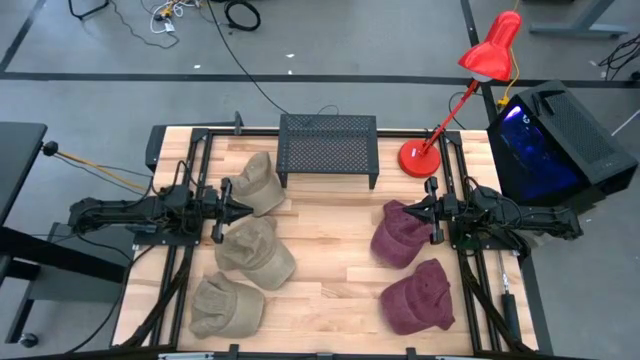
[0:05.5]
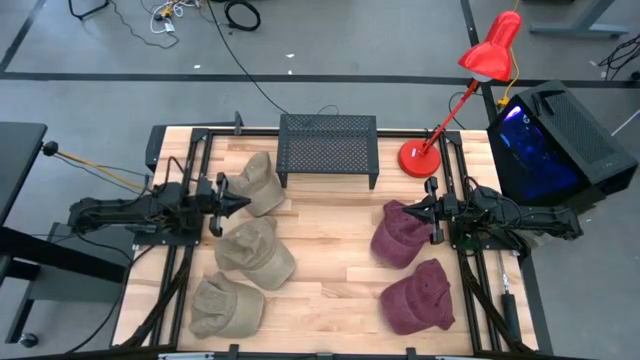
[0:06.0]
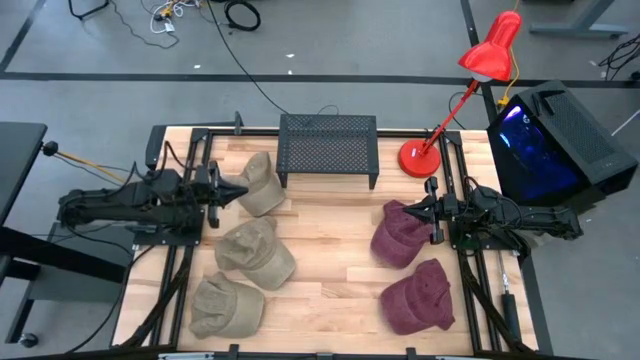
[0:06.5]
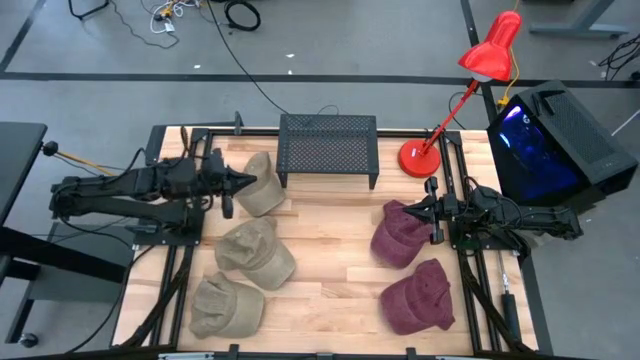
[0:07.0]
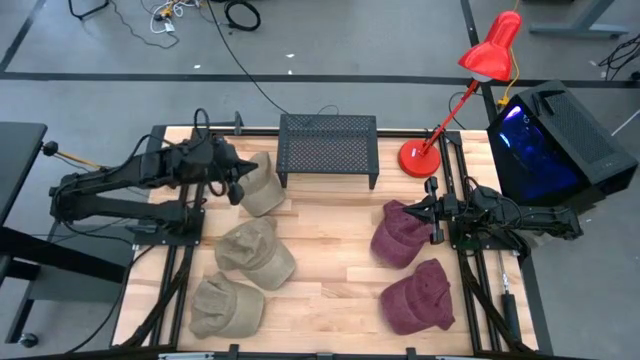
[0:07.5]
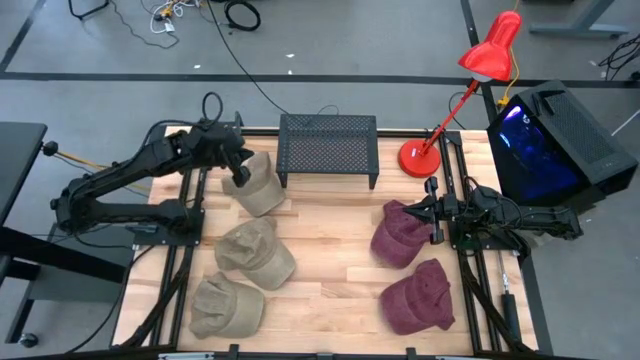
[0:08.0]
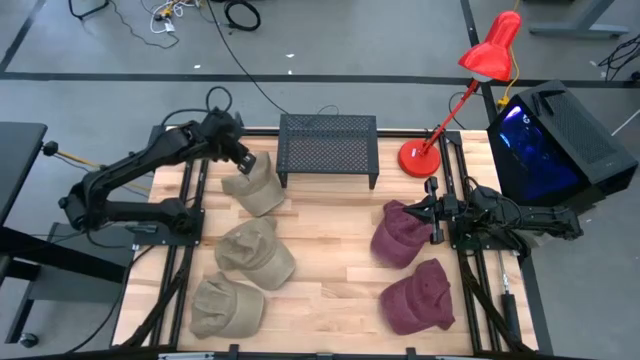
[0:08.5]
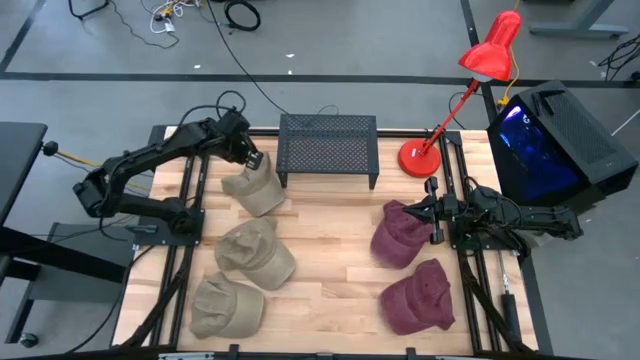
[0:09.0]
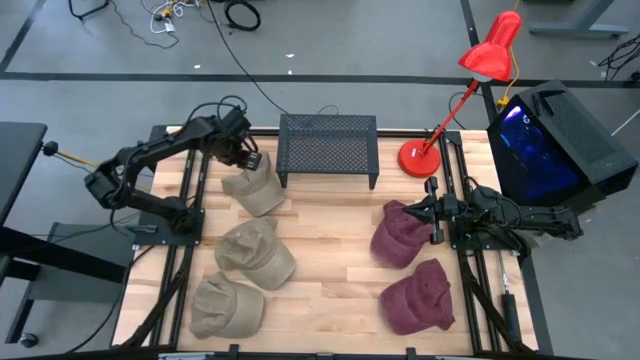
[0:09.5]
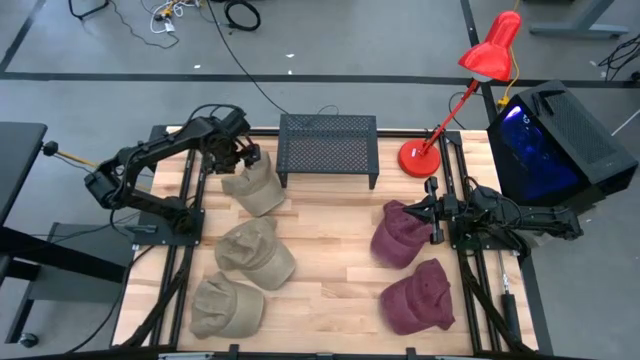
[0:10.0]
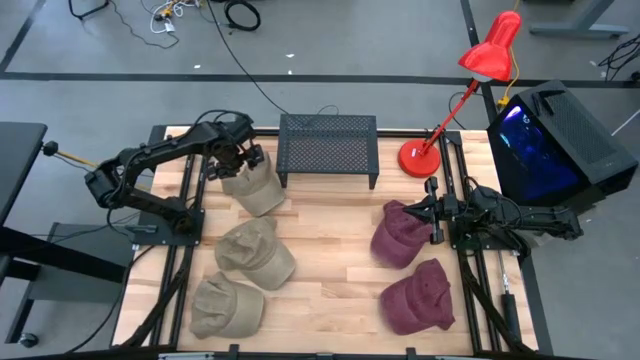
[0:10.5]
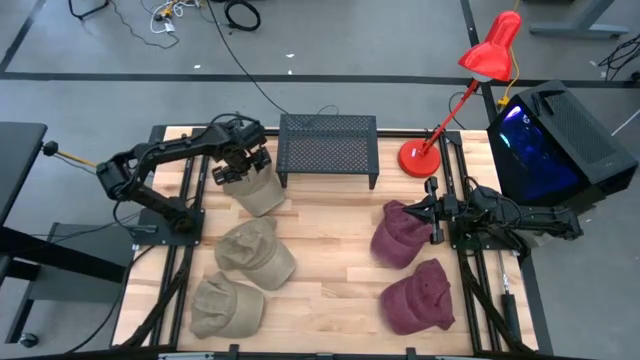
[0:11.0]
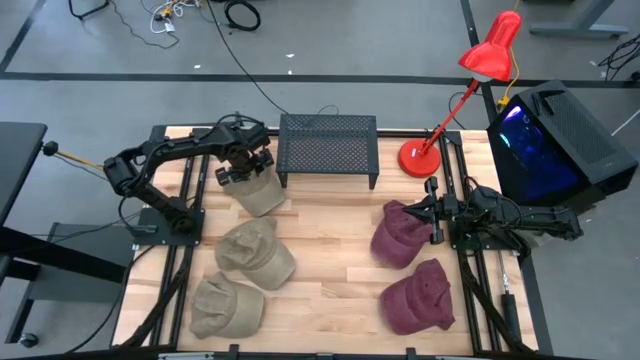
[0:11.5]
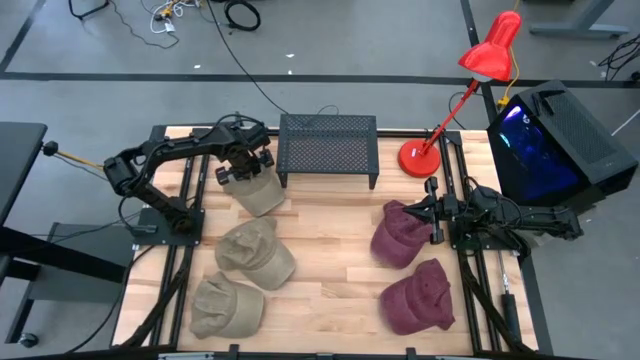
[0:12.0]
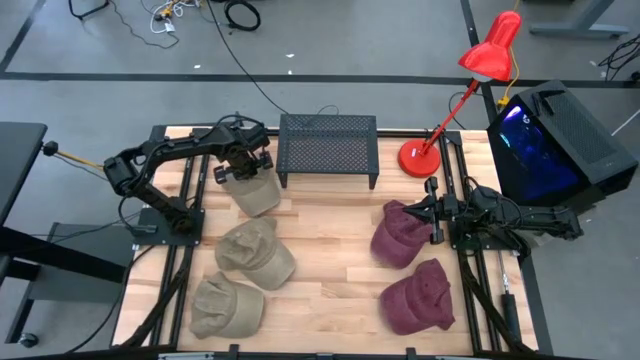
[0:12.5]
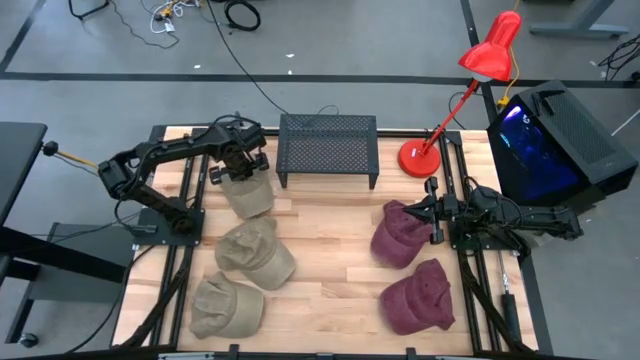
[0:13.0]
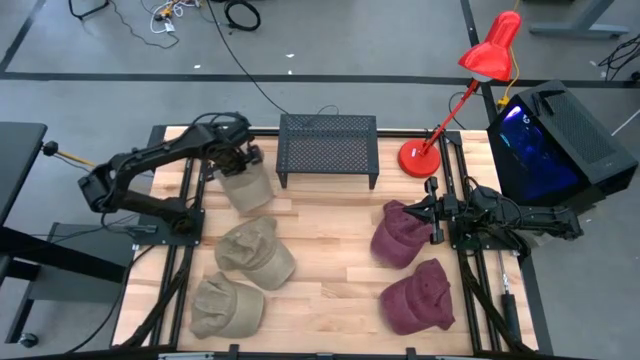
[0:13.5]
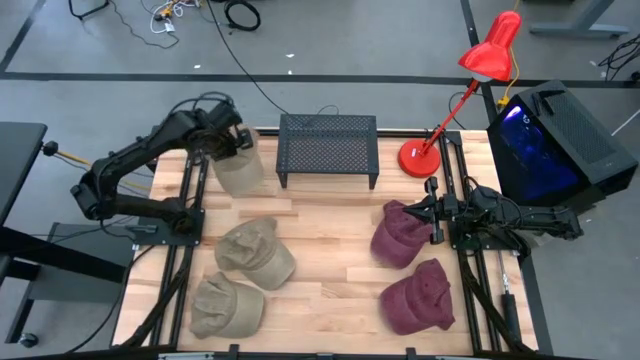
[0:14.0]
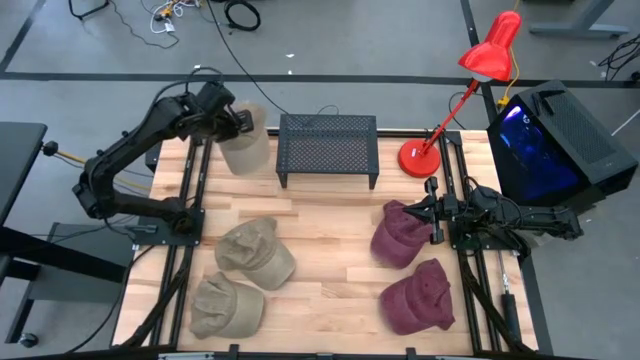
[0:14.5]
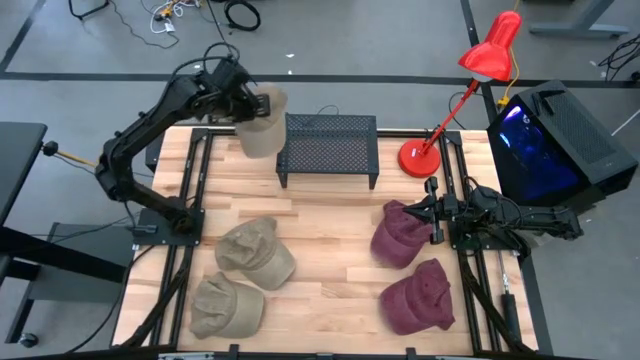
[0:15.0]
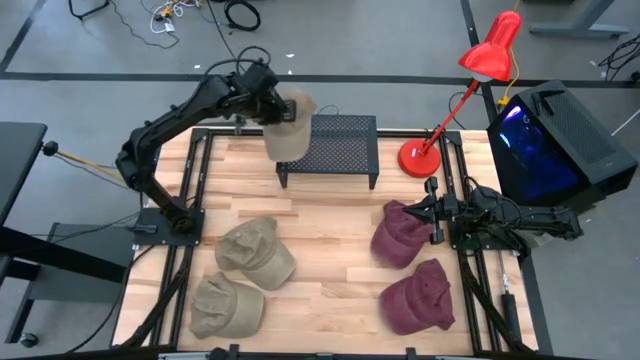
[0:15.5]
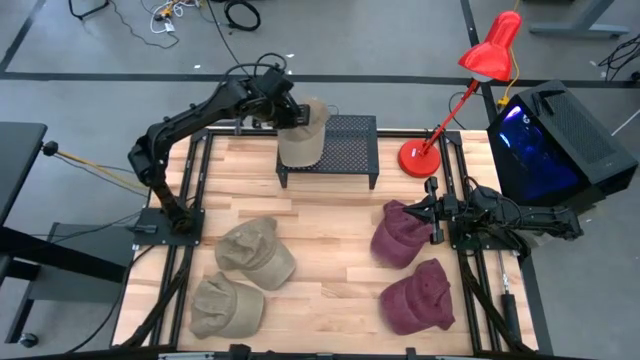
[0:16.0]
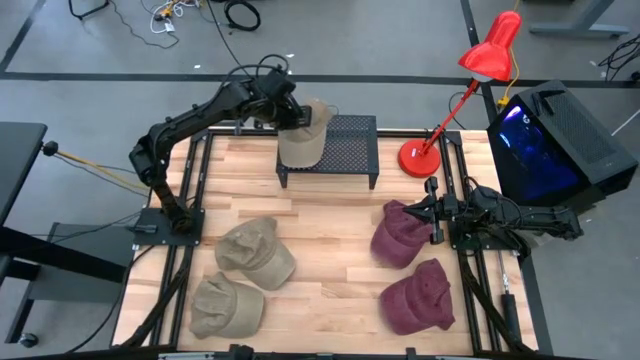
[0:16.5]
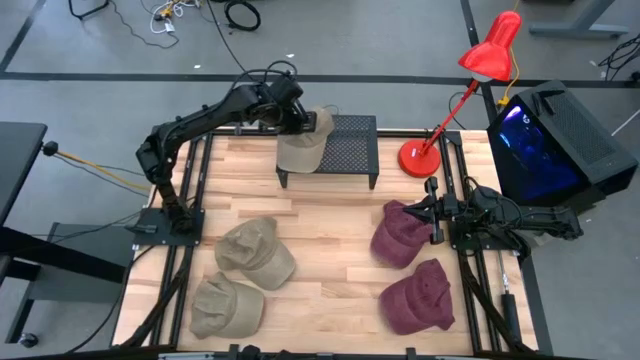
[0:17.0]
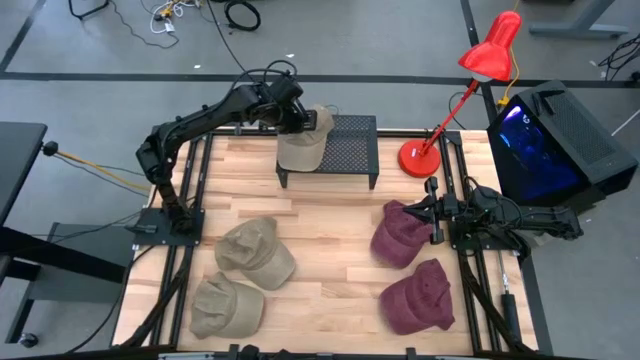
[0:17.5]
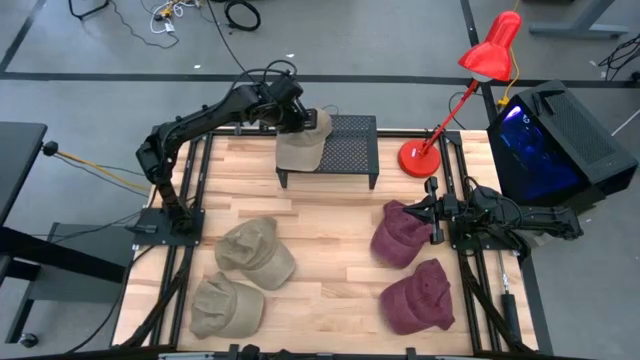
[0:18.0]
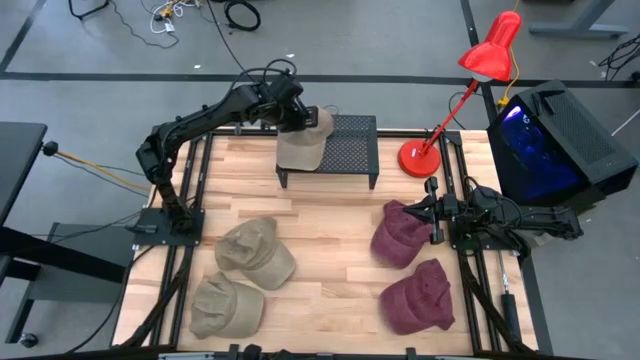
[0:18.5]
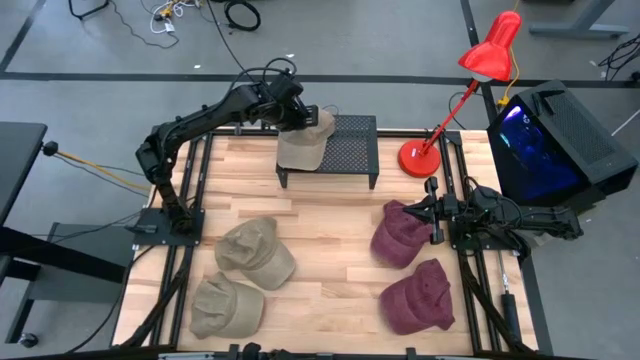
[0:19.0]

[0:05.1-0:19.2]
Task: Pick & Place hat
Put the top brown cap on the shelf

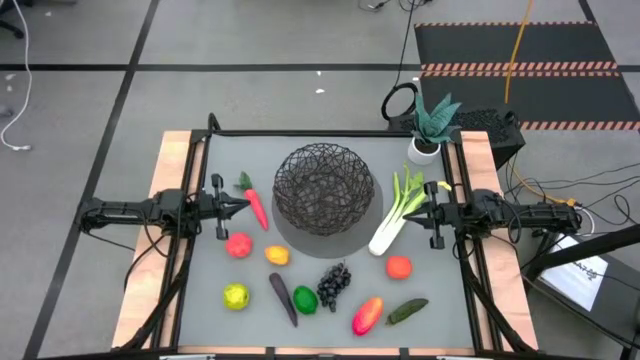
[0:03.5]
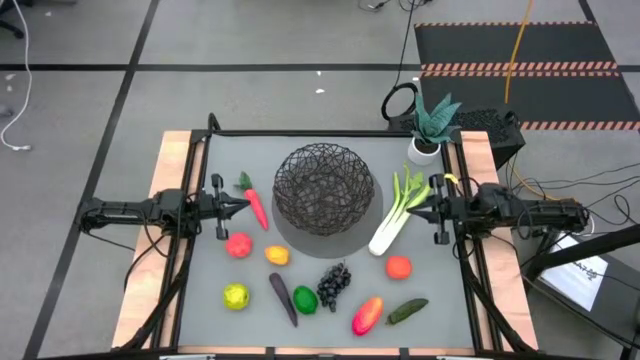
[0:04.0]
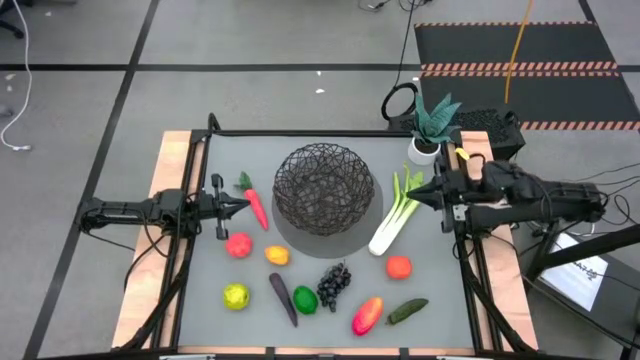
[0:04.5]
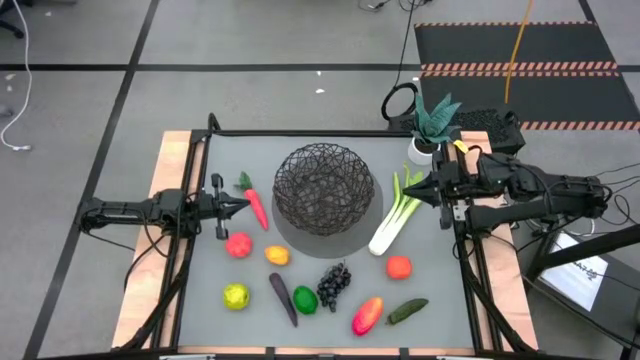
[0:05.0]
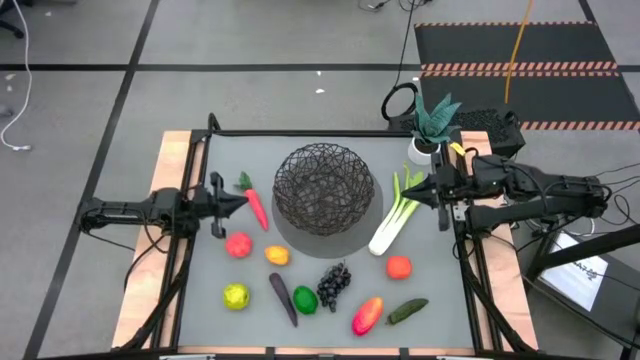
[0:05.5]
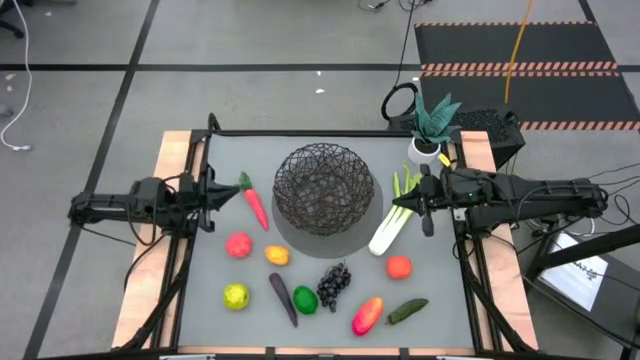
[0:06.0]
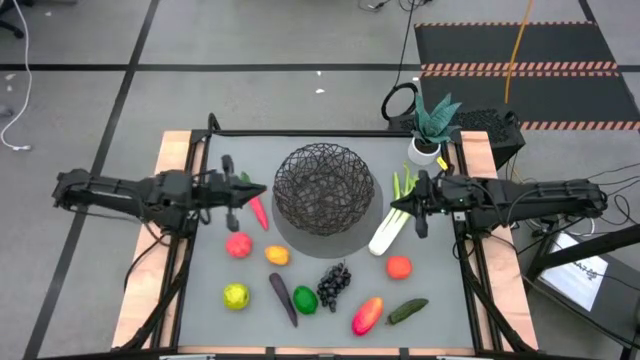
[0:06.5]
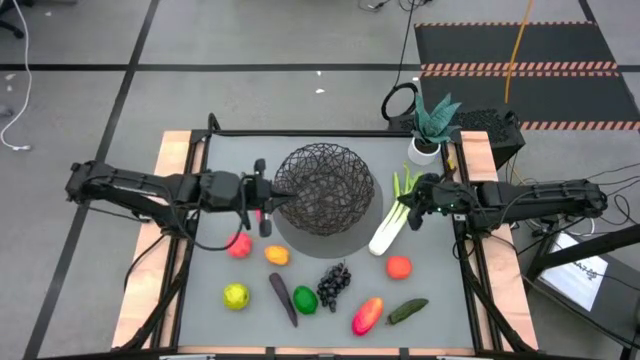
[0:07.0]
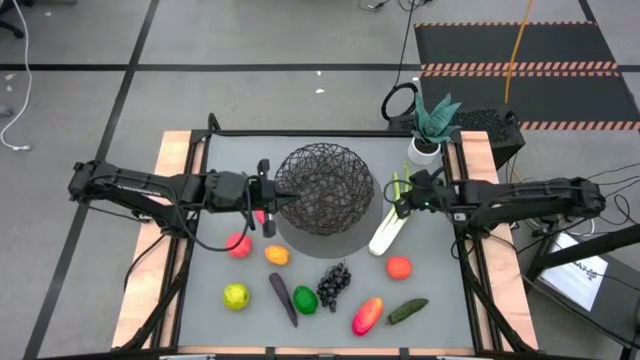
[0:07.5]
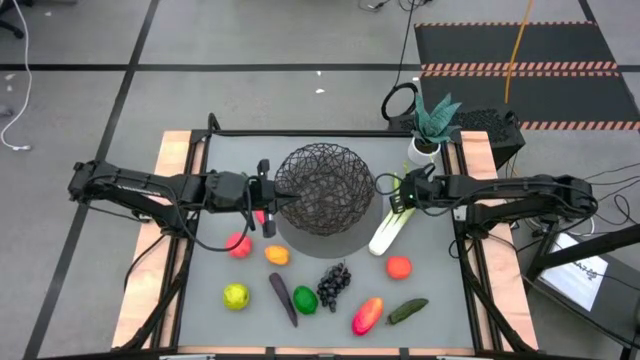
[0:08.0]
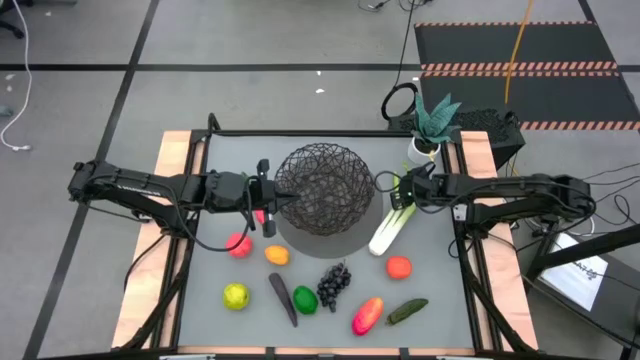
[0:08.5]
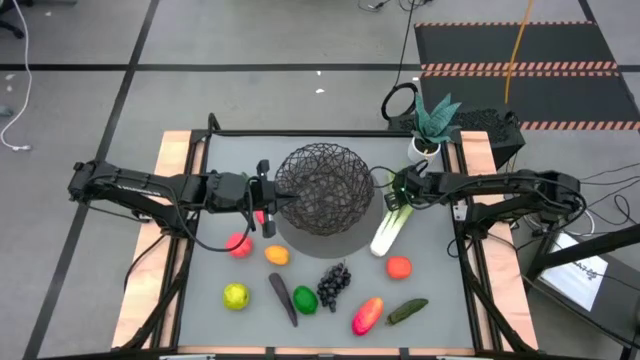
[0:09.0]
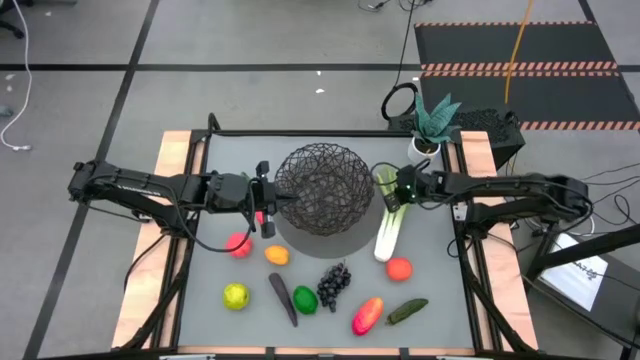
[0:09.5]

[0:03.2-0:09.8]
Task: Build produce basket
Put the celery into the black woven basket
